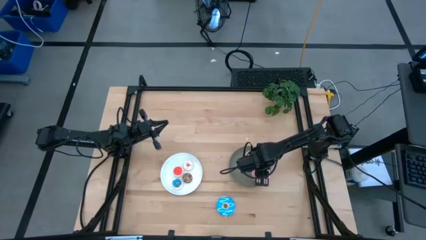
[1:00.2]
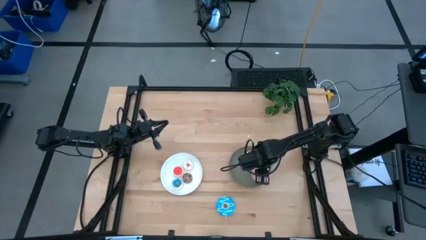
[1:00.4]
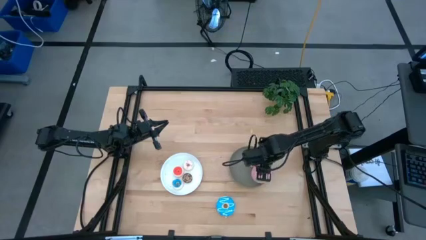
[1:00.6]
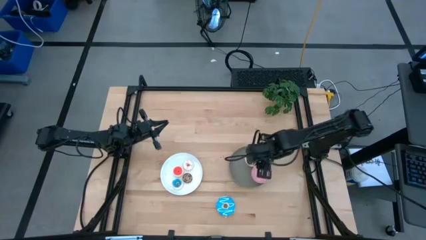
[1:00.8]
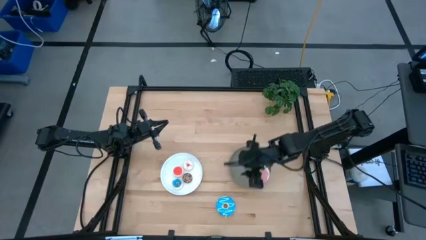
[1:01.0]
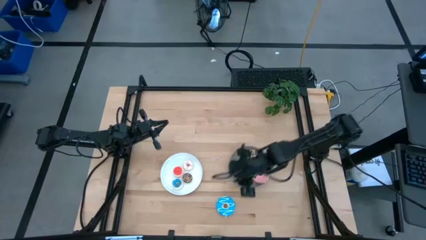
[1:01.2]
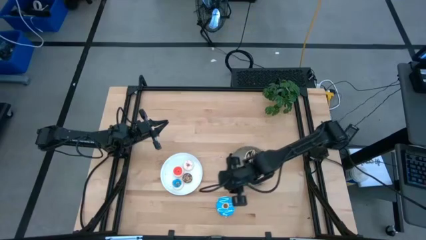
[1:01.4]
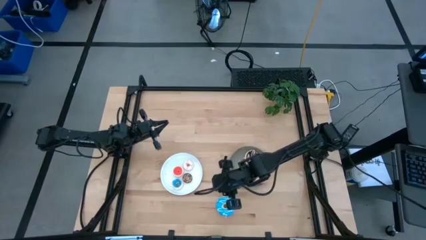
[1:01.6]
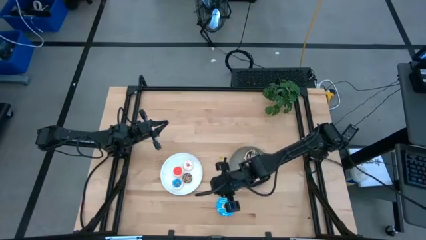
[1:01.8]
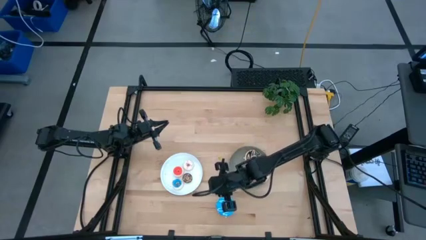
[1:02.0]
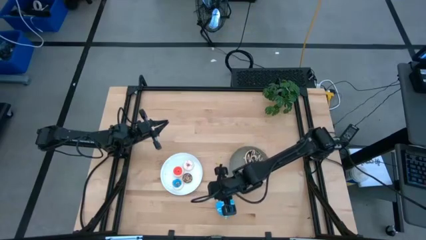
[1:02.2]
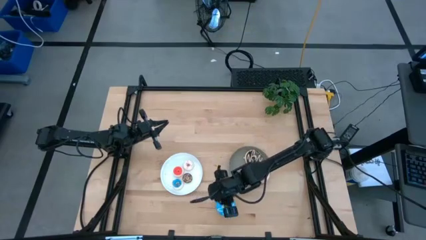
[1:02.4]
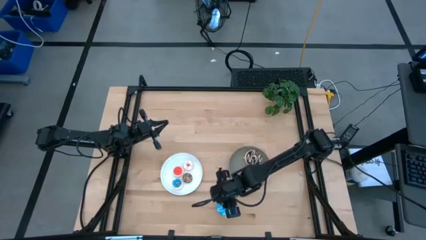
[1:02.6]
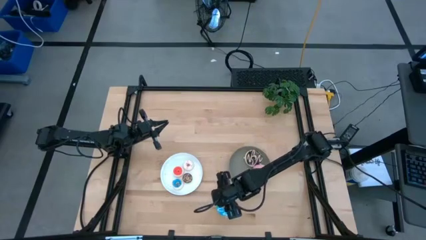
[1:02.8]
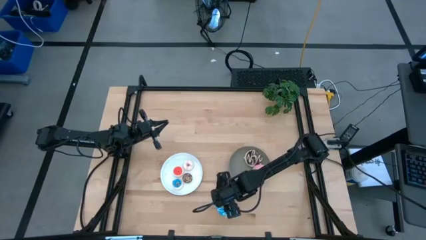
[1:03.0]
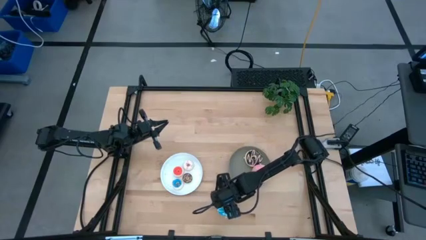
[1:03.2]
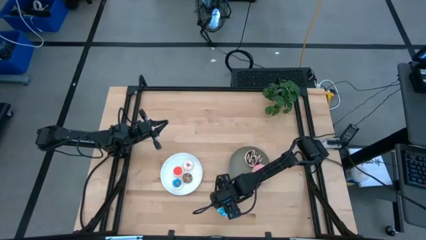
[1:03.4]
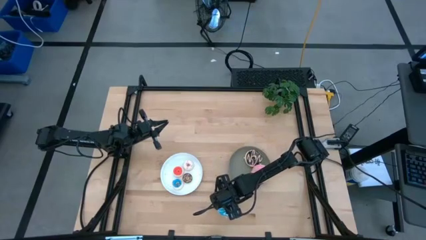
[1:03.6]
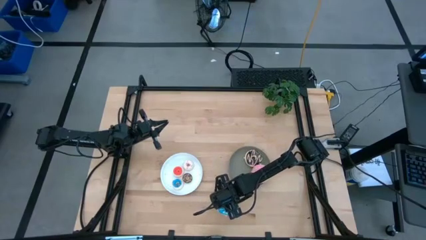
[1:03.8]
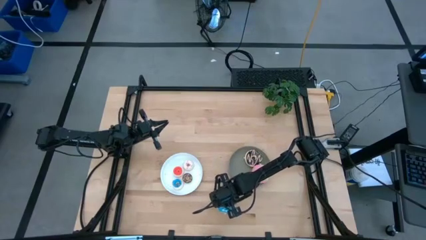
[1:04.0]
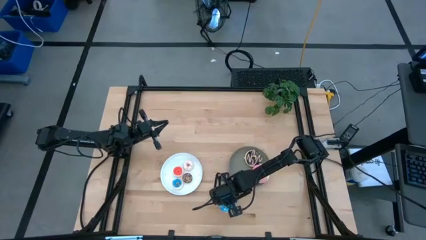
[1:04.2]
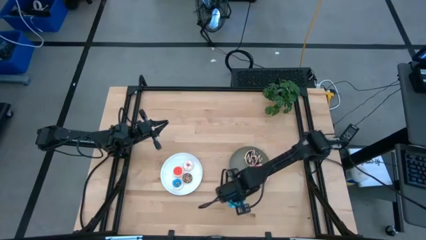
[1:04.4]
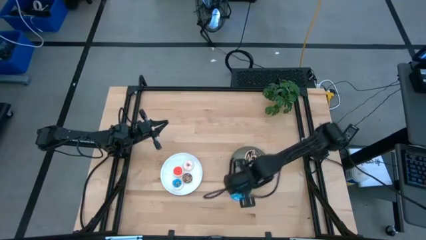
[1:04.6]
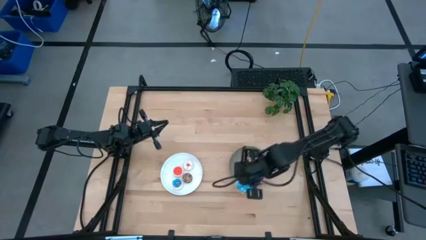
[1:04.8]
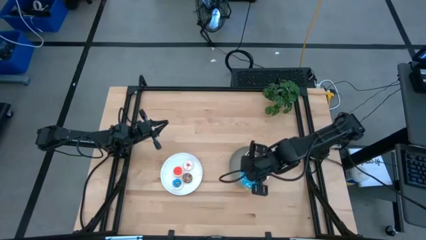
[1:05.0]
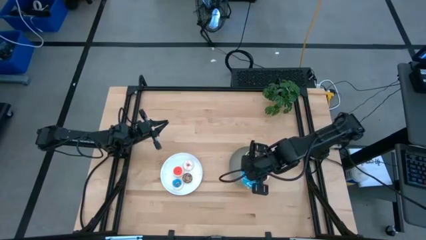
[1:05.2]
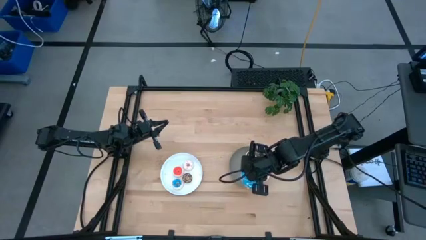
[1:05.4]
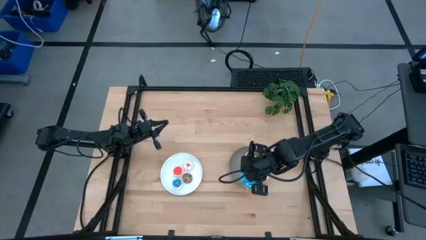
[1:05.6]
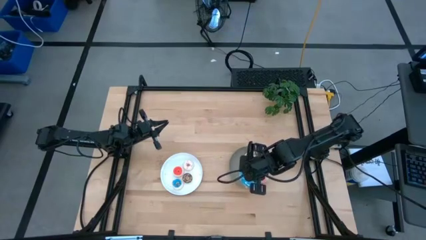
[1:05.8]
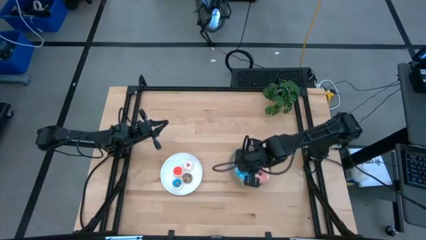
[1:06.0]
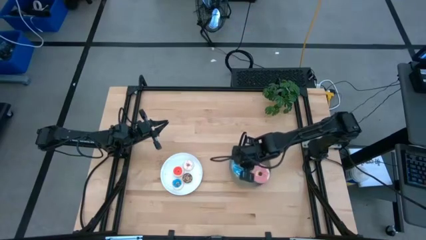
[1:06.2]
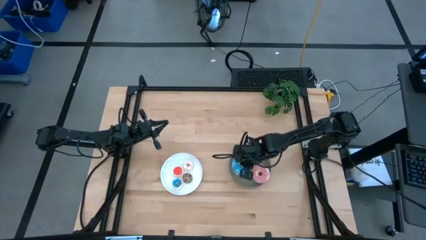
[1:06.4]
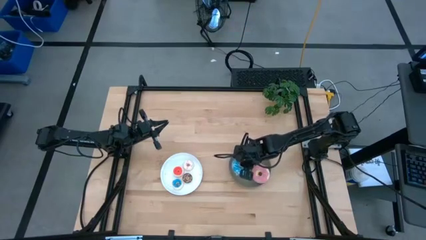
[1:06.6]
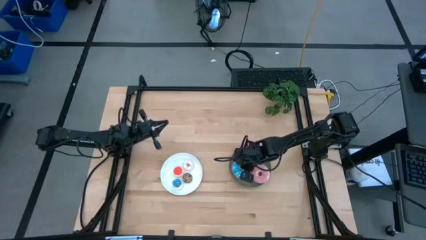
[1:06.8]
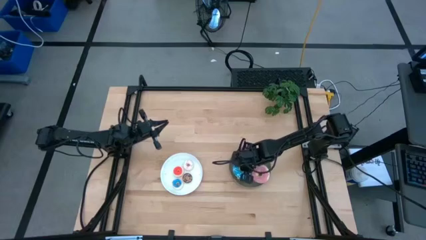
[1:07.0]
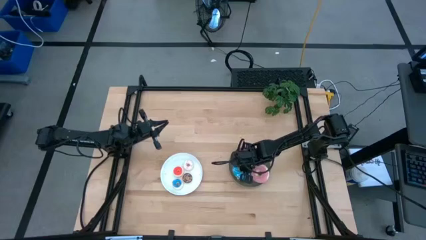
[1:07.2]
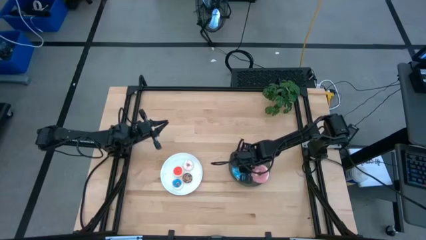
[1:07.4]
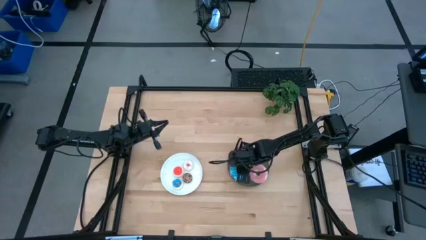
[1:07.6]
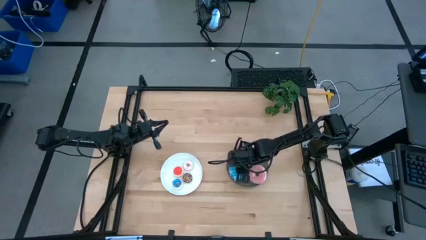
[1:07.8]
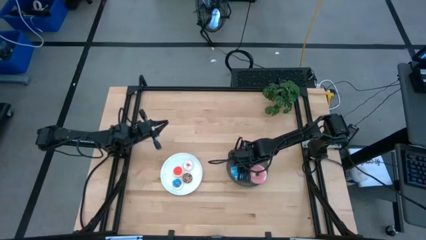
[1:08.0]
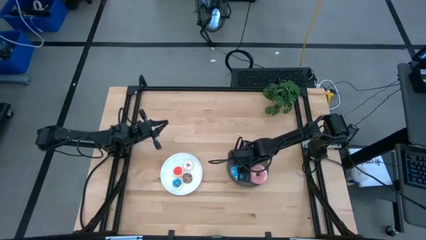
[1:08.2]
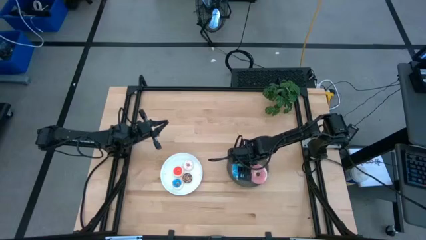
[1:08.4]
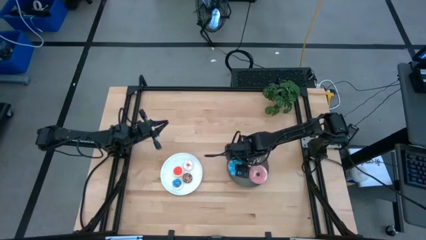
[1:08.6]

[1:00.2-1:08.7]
Task: Pick & Place donuts
Put the large blue donut on the gray plate
